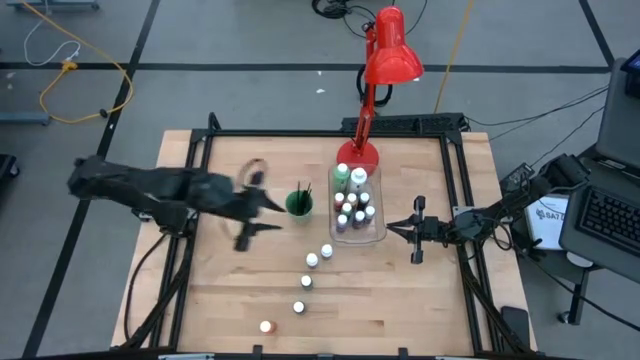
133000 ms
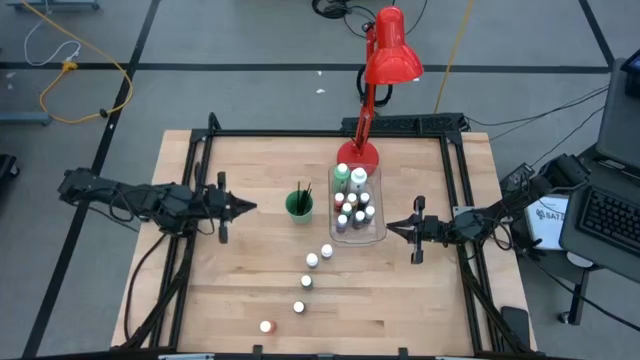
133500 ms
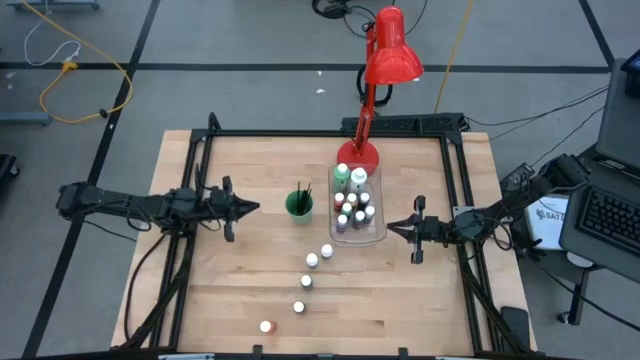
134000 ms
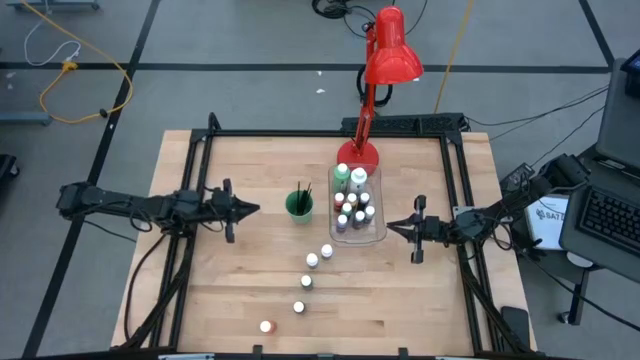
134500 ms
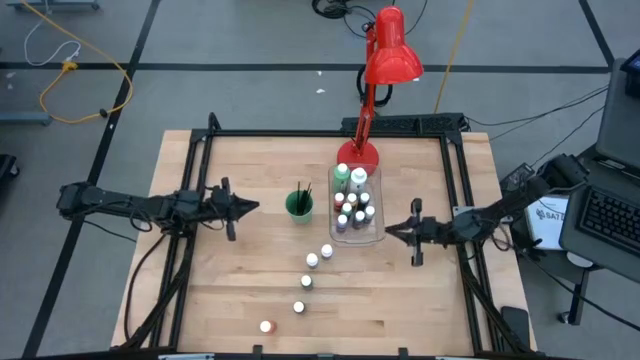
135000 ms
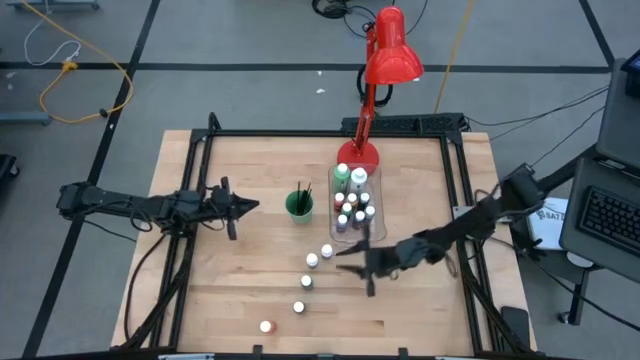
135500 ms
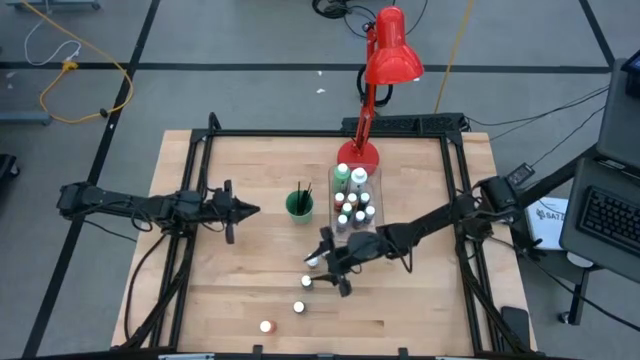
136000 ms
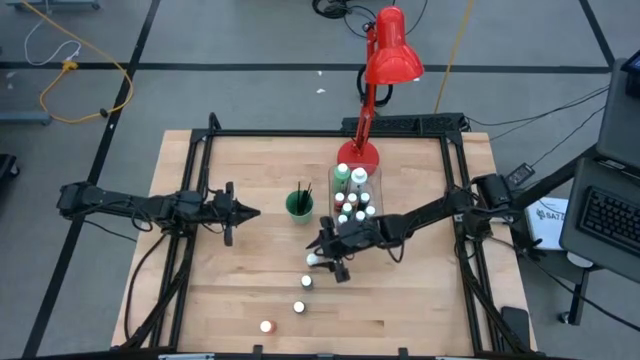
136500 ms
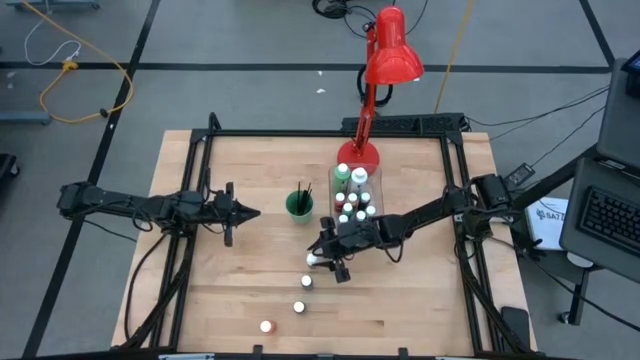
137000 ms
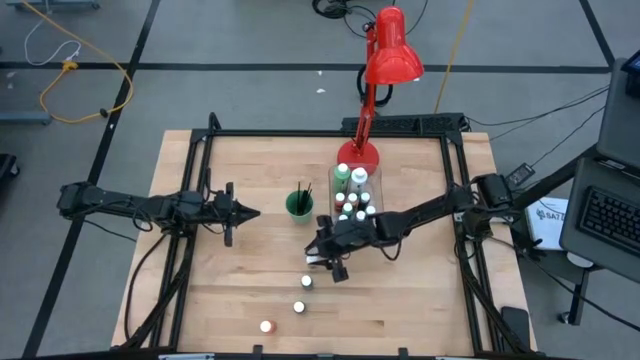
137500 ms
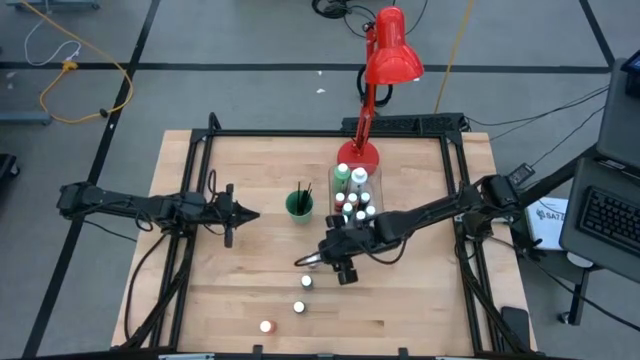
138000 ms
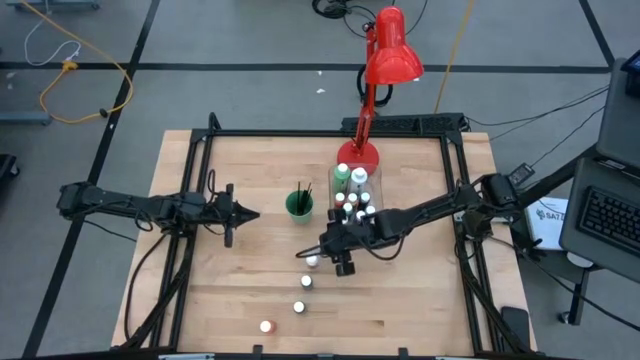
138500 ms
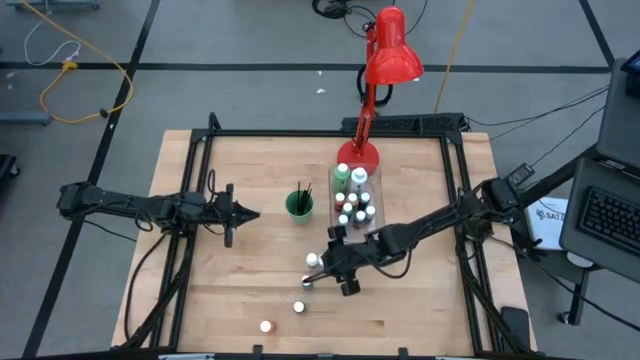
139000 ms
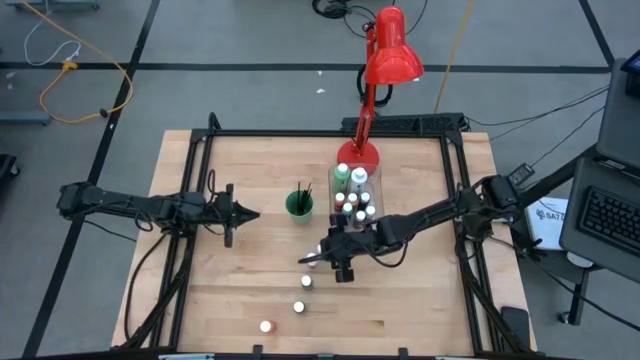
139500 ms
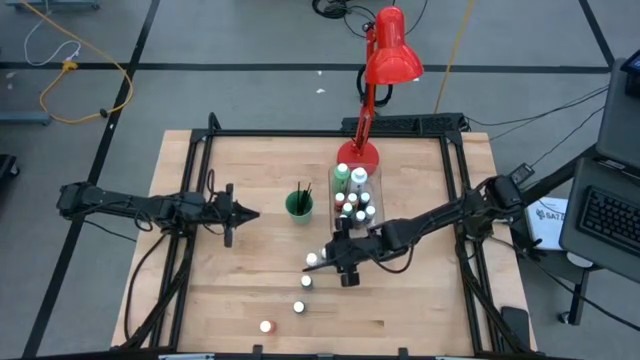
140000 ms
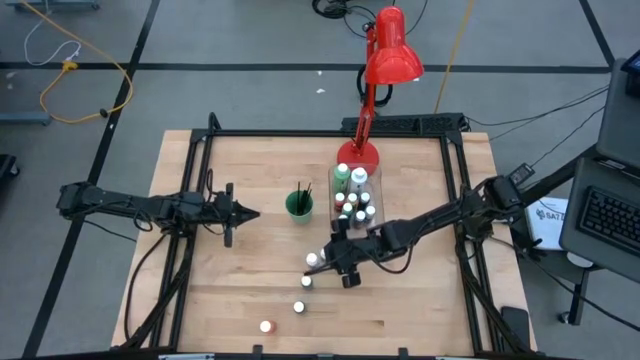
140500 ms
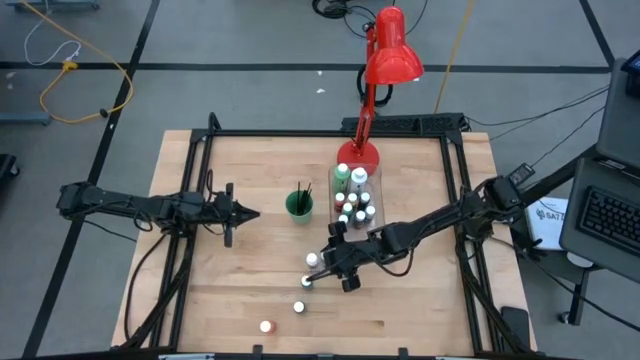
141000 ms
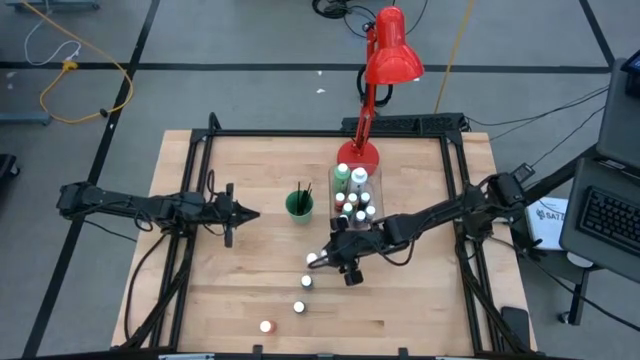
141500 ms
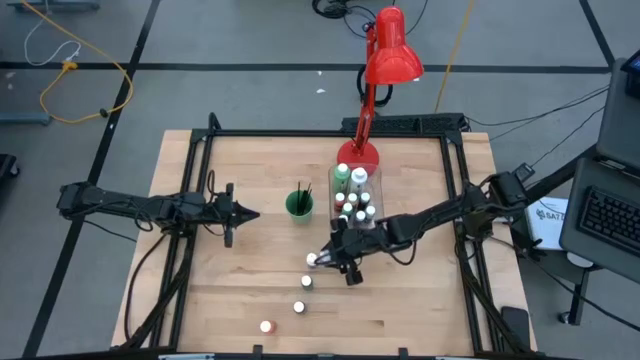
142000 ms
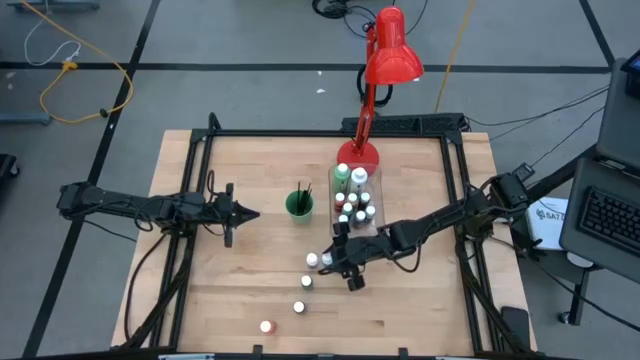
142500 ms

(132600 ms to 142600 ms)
Task: Pick & Place Paint Supplies
Put the right small white paint bottle into the transparent bin

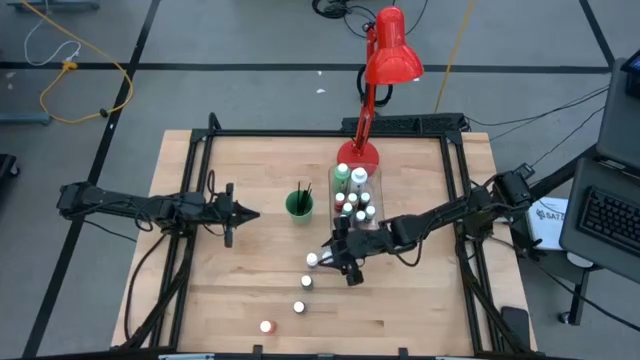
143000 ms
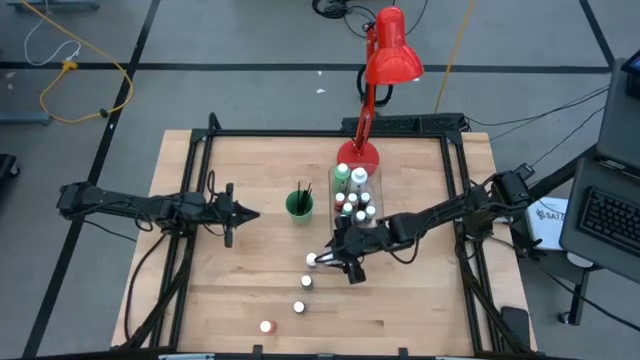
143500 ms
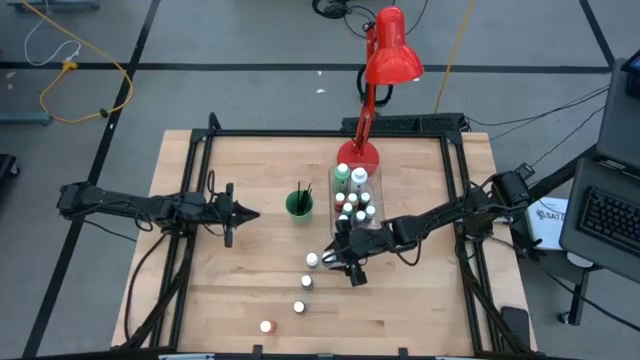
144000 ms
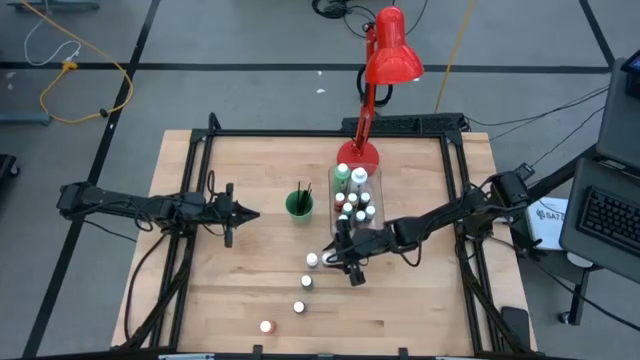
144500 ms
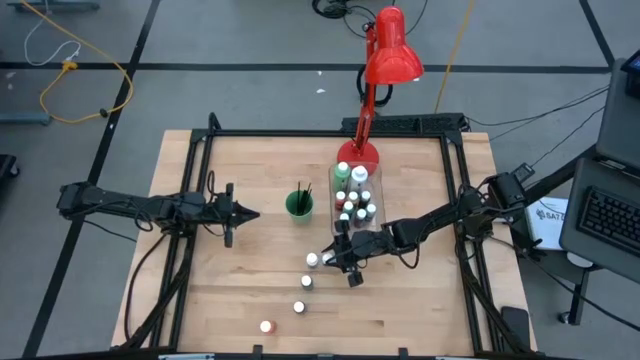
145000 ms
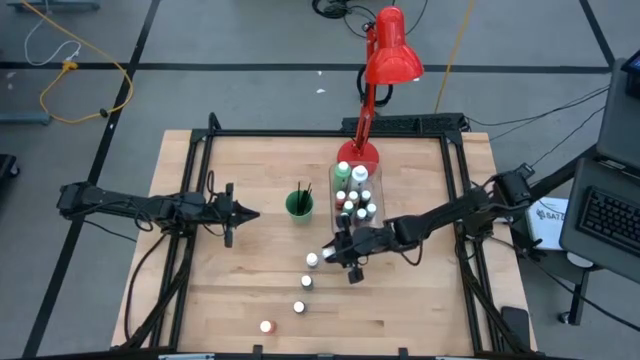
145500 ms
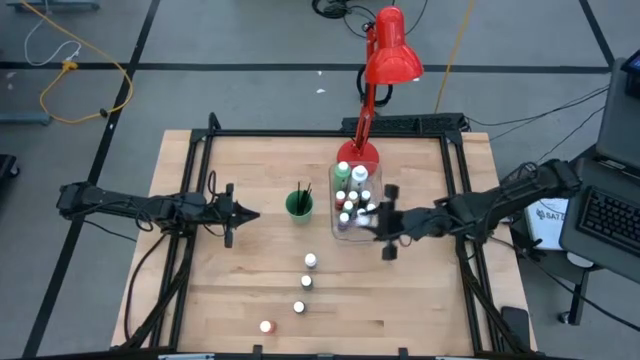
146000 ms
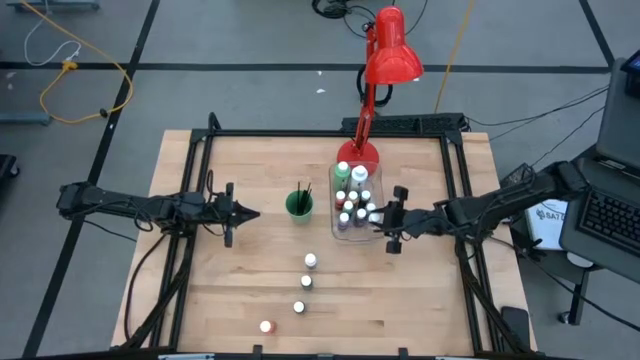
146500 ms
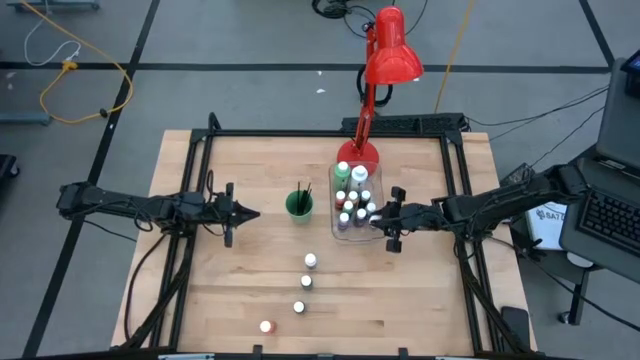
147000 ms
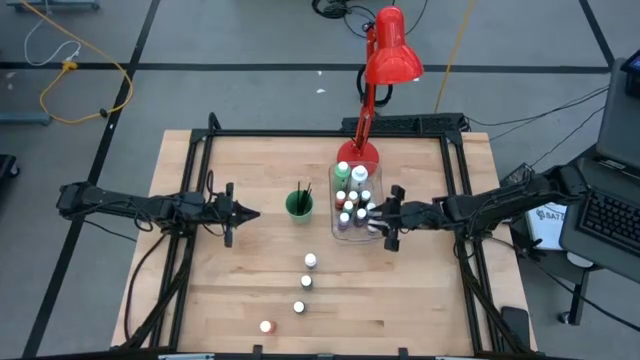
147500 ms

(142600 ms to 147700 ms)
Put the right small white paint bottle into the transparent bin

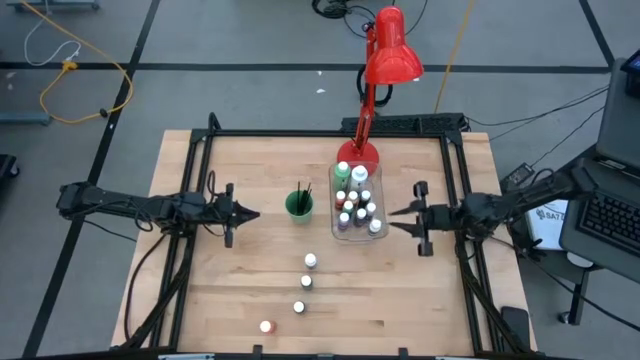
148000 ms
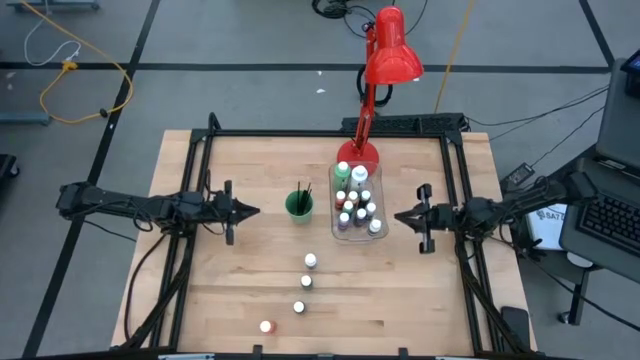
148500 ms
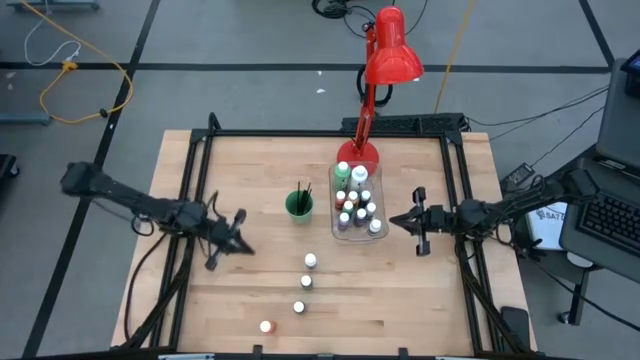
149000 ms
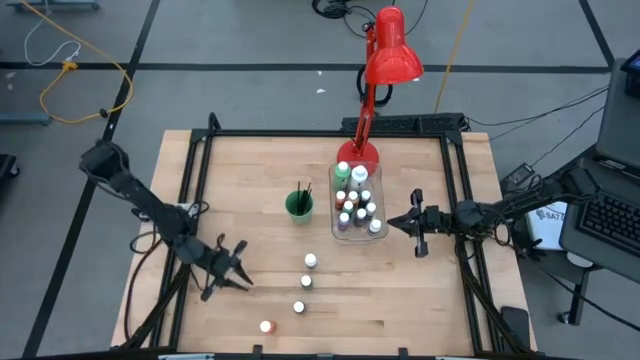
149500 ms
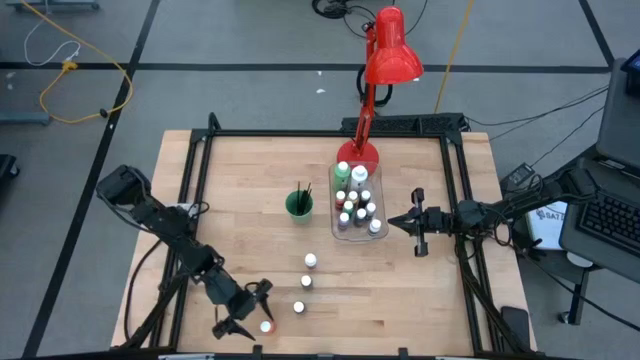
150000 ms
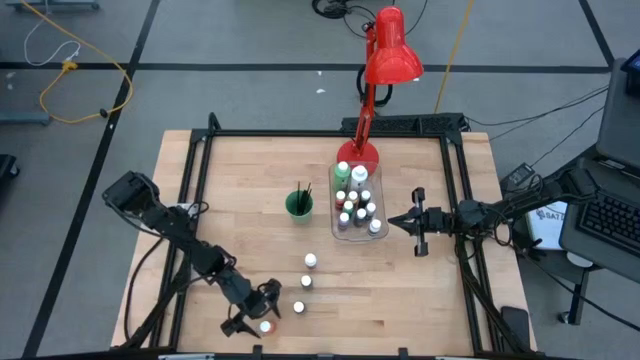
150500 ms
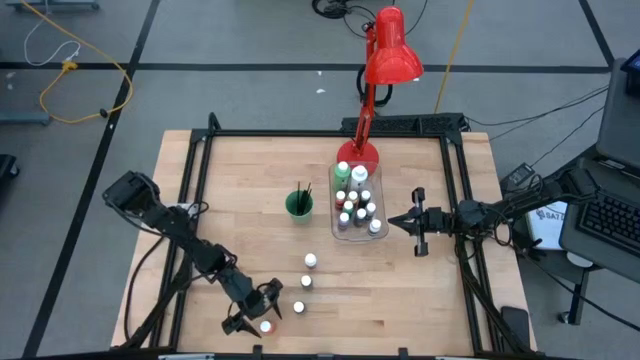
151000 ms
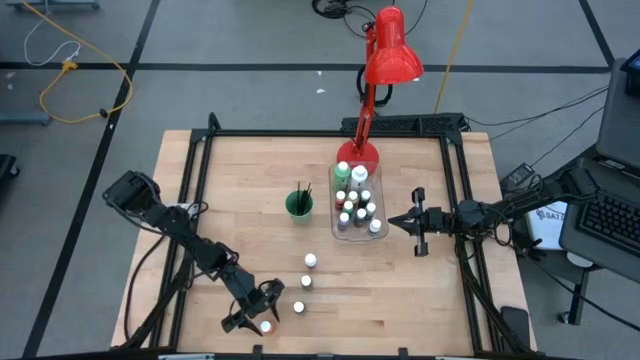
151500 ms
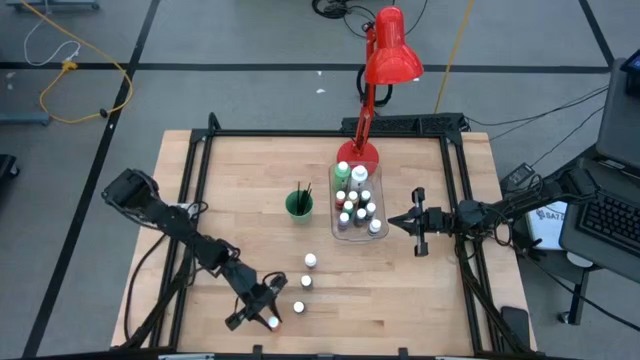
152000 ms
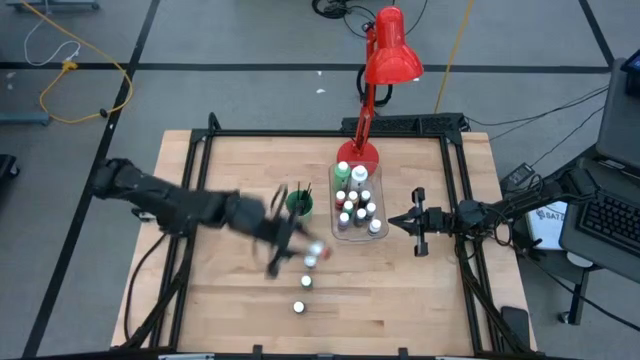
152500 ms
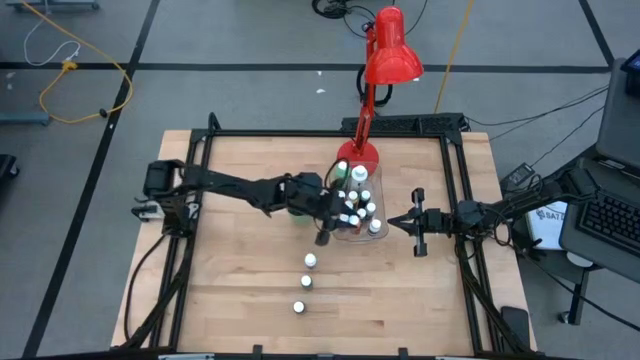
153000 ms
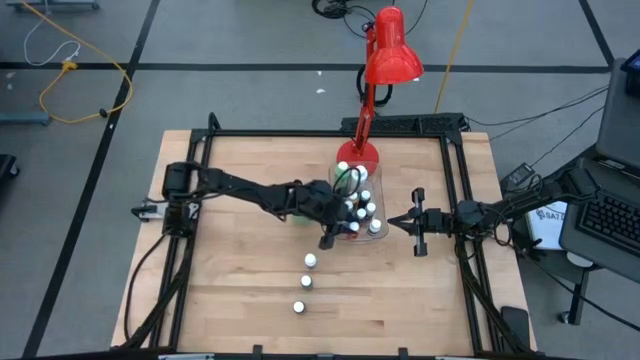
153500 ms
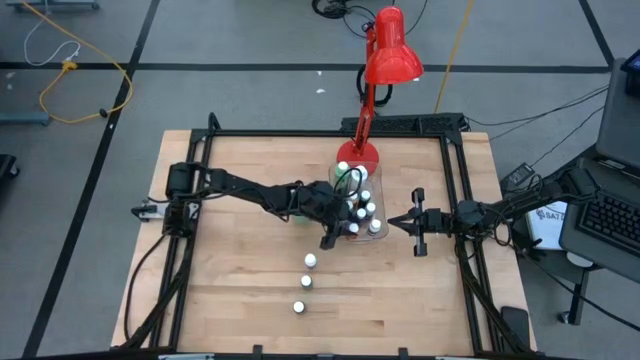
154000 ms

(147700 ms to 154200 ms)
Put the orange paint bottle into the transparent bin
